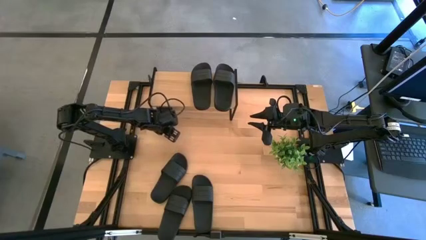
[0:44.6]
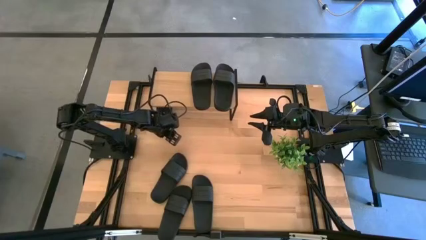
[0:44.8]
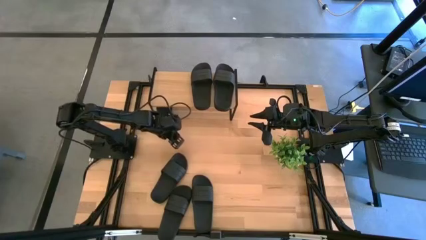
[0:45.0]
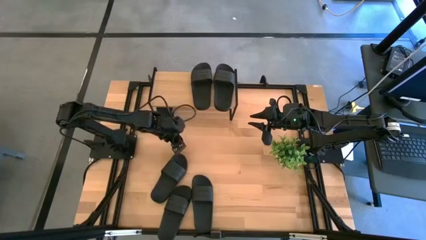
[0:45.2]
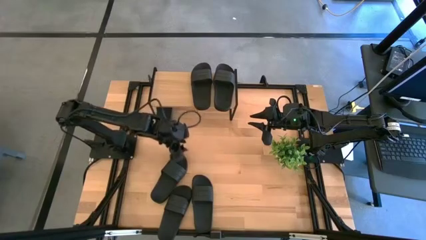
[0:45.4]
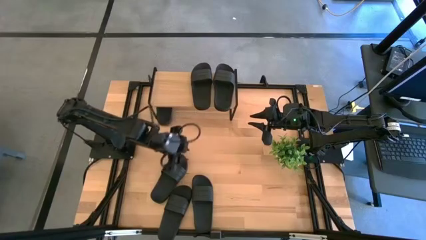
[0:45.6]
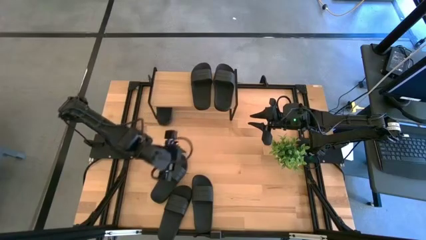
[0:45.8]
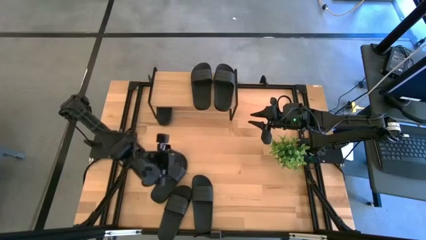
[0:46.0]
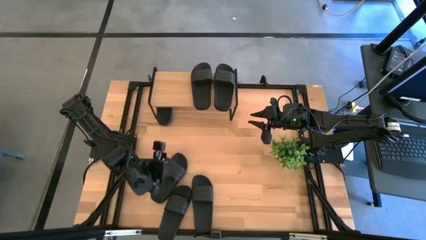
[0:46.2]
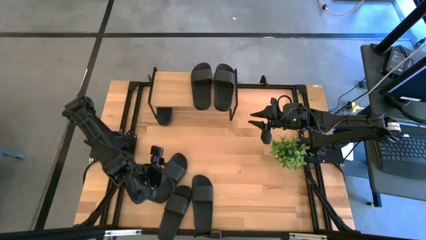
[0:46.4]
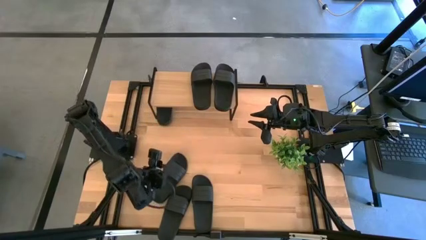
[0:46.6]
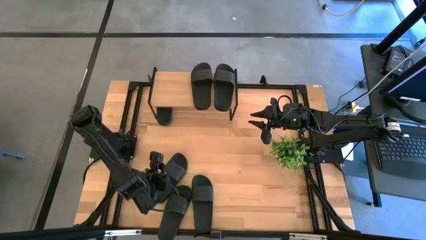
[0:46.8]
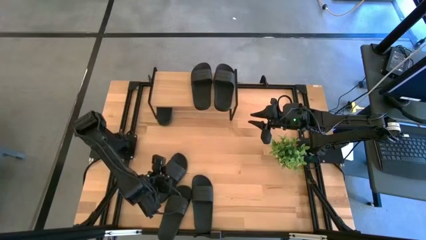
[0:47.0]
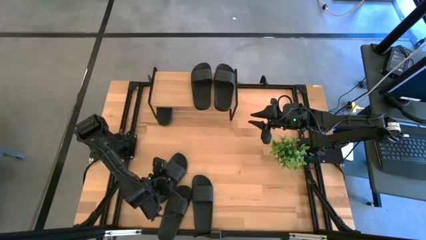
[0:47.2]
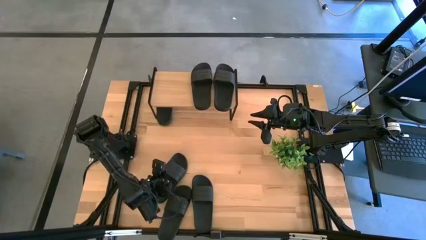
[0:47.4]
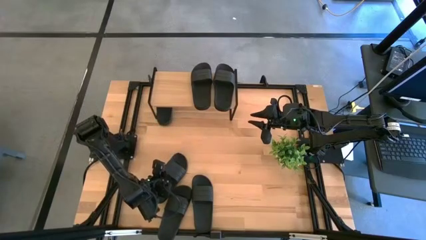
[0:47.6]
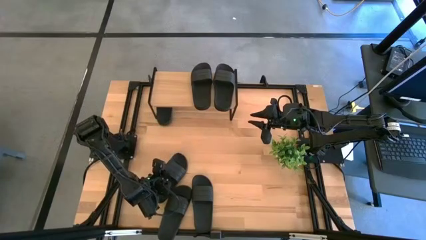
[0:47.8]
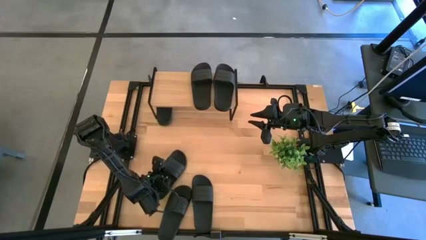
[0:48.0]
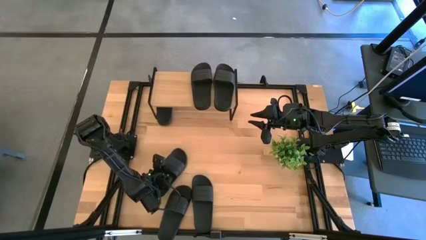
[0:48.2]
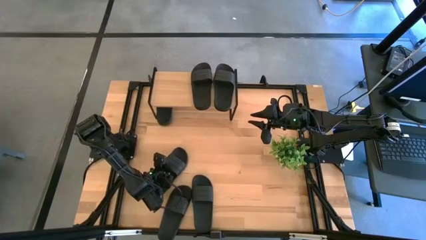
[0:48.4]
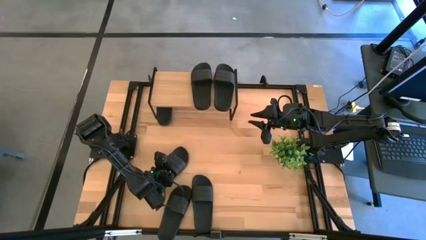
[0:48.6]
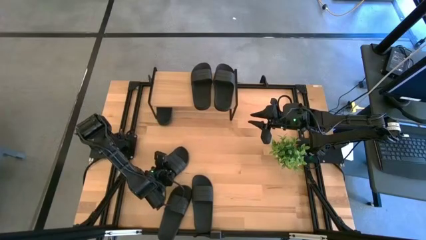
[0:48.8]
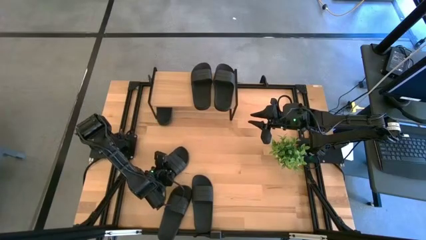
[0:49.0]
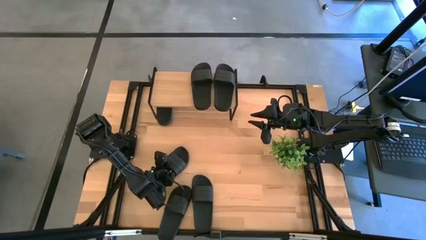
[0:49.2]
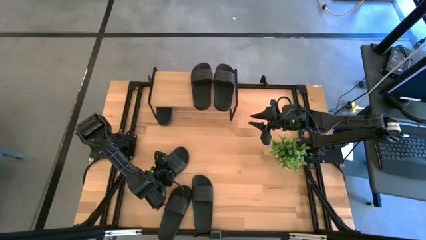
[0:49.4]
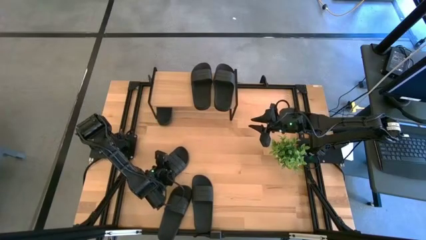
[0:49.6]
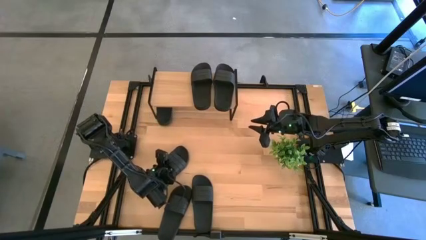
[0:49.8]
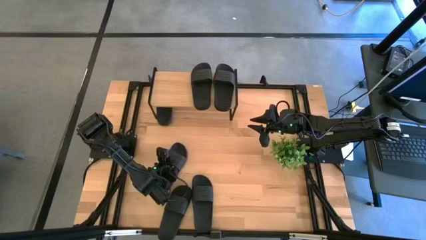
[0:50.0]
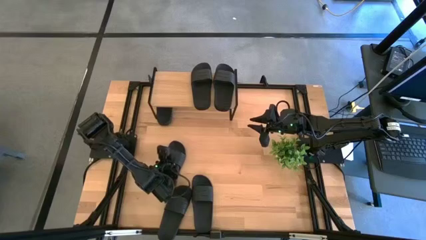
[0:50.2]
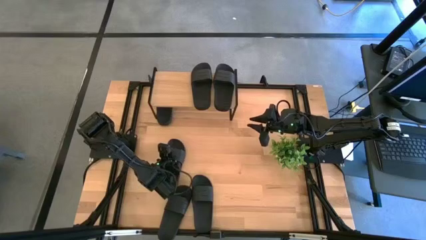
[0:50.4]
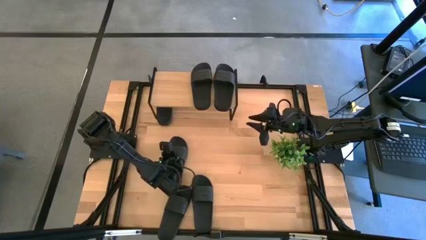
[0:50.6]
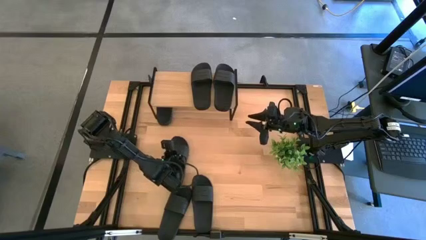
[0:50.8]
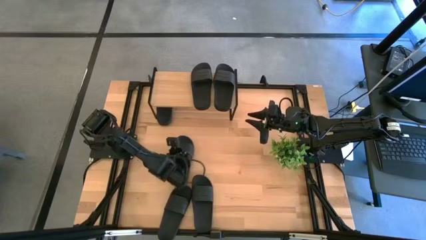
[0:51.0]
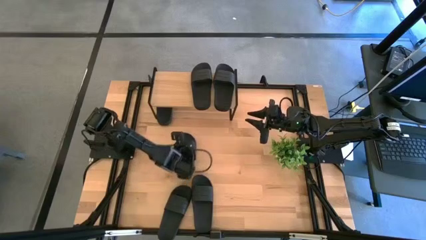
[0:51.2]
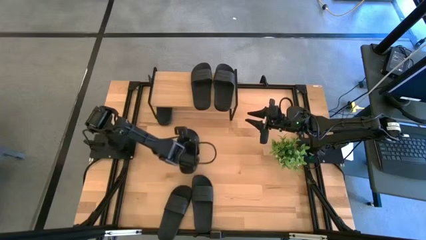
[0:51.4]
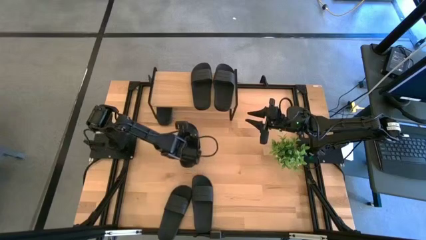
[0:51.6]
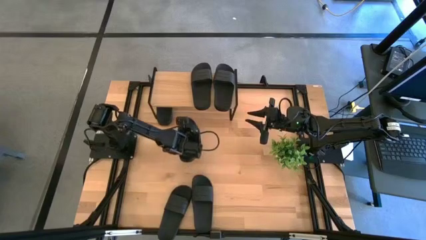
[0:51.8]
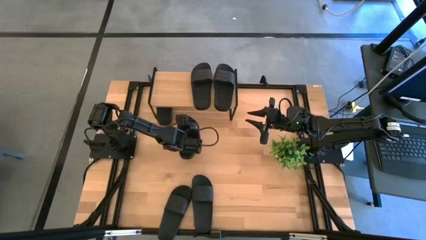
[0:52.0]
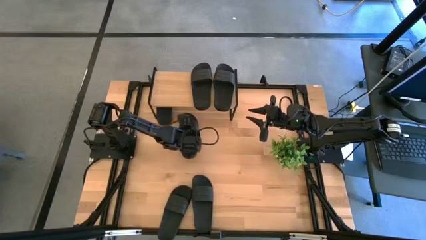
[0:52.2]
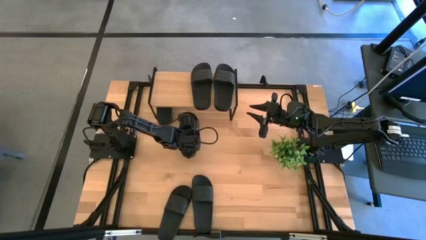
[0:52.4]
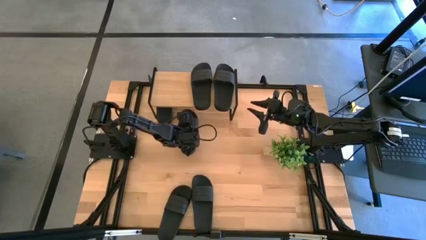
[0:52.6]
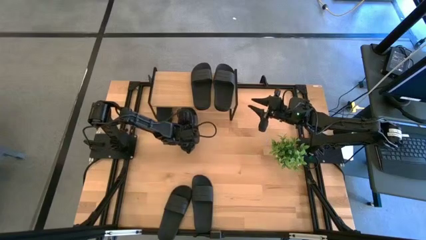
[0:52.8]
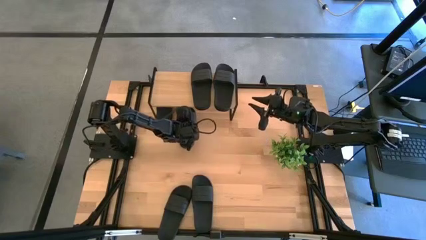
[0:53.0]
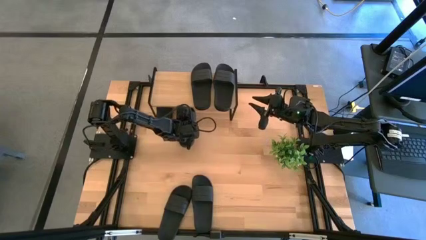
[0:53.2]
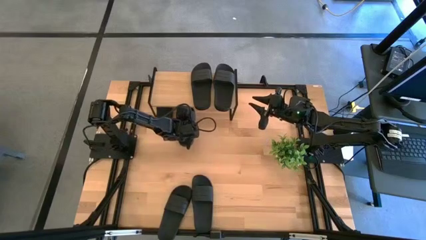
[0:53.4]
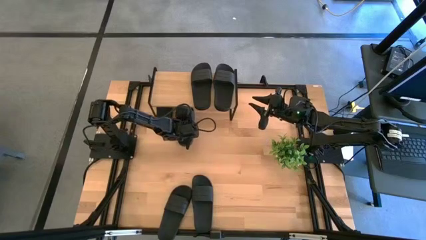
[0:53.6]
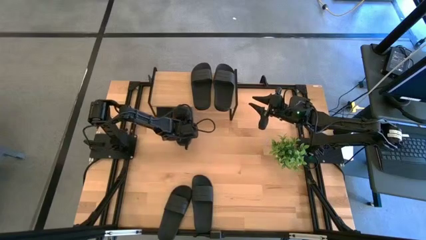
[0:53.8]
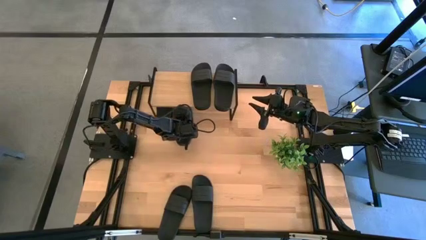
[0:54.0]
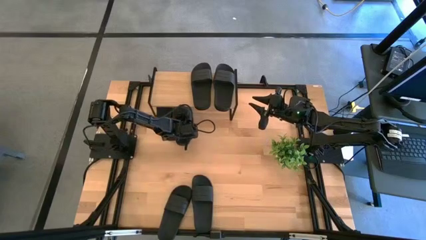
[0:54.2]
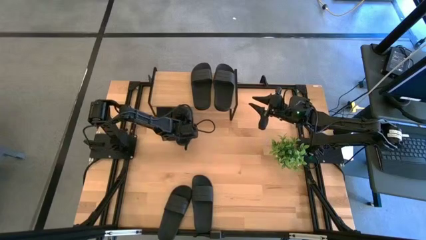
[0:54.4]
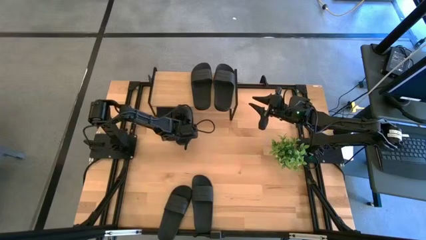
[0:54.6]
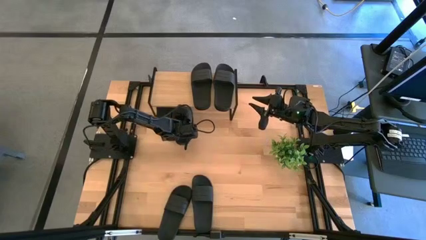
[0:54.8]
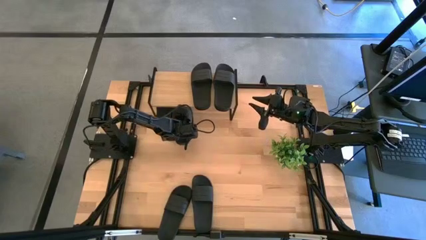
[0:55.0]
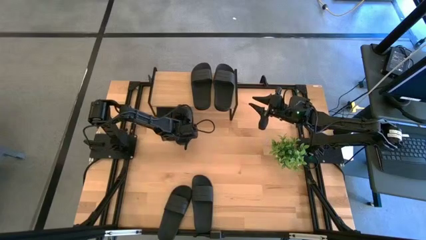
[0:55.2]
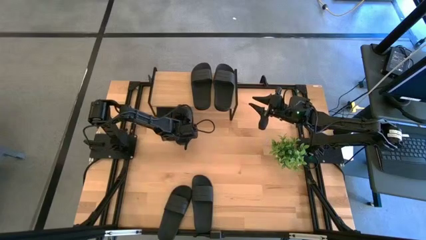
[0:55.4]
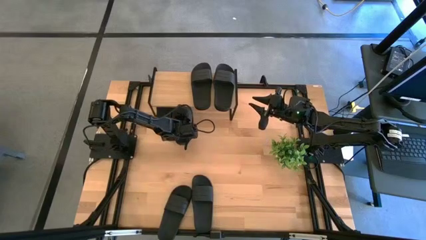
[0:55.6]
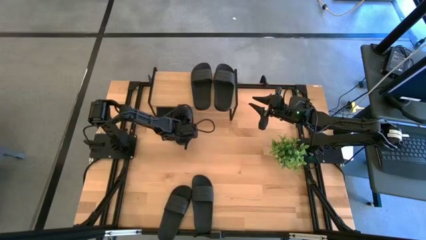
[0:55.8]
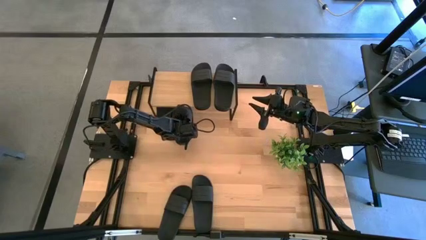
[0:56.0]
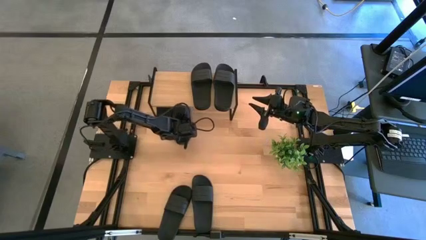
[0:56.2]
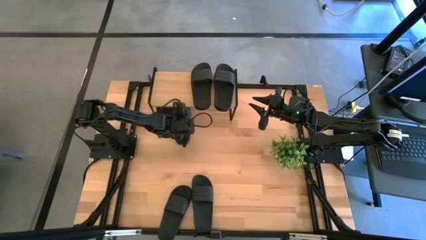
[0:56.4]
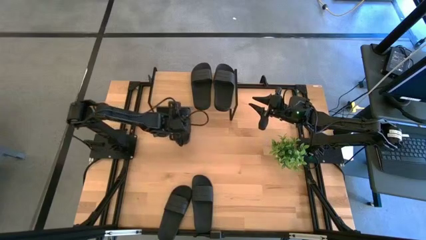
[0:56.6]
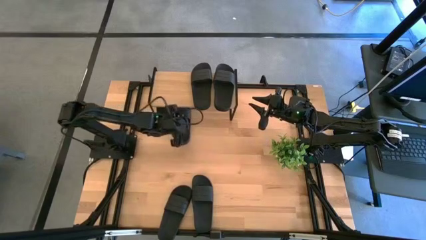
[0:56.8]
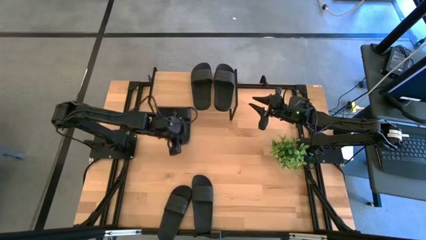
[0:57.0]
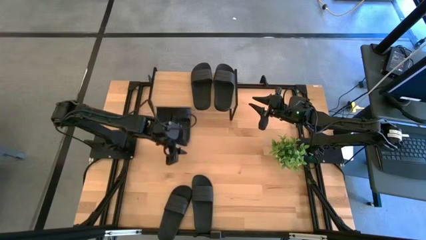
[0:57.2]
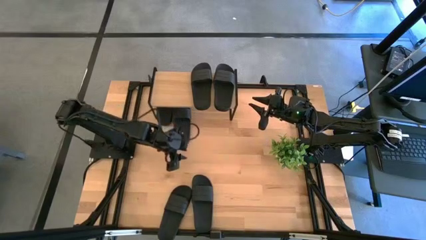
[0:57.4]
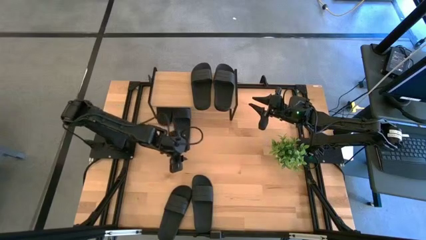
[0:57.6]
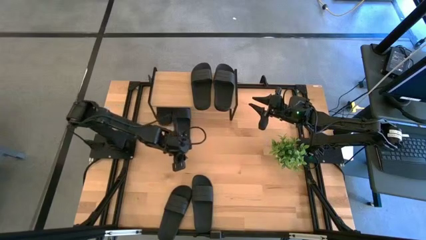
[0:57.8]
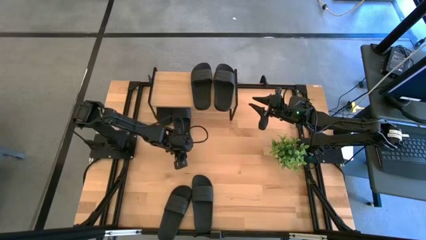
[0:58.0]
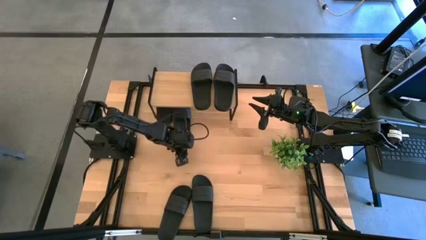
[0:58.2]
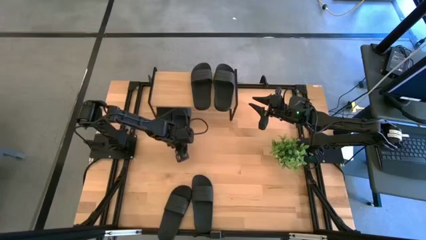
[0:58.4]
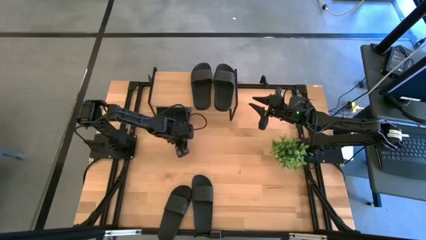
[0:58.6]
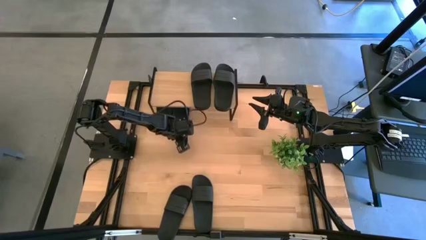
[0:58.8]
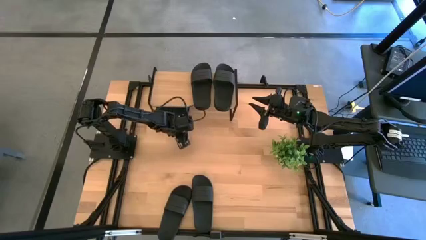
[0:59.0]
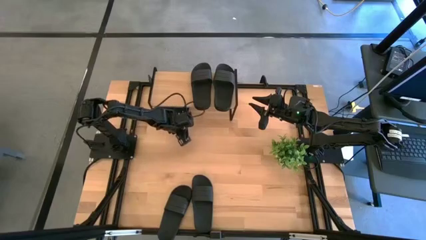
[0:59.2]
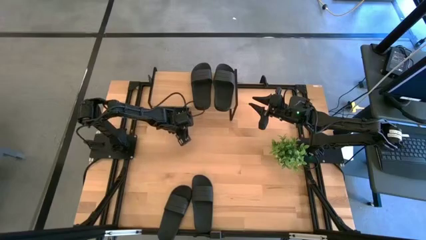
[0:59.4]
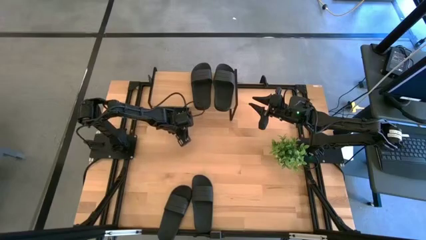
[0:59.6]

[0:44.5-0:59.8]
Task: Pick and place slides into the shelf
Put the black slipper under the shelf

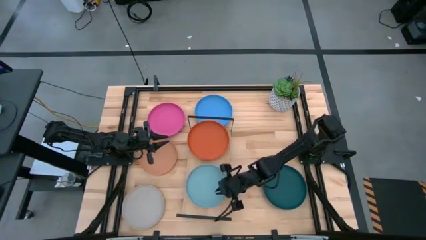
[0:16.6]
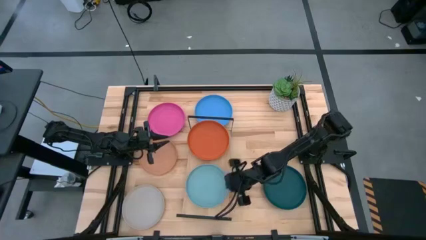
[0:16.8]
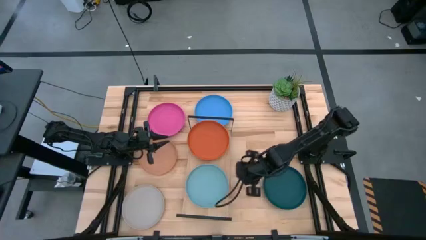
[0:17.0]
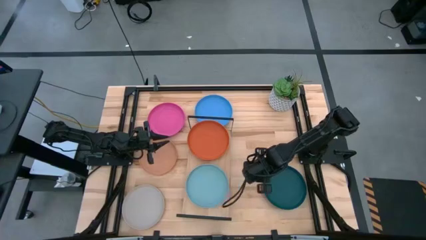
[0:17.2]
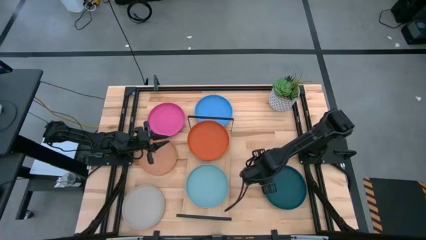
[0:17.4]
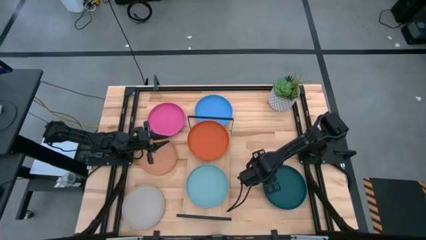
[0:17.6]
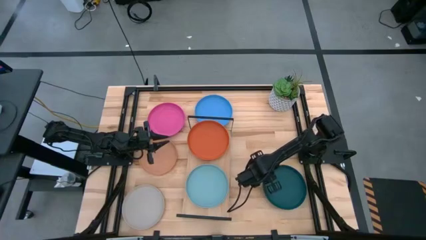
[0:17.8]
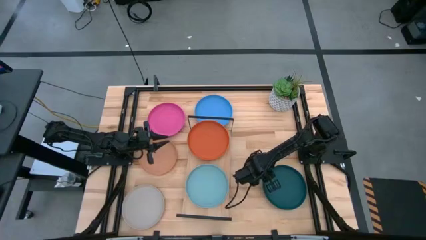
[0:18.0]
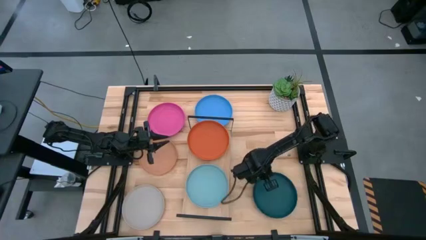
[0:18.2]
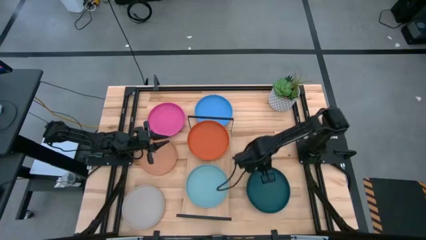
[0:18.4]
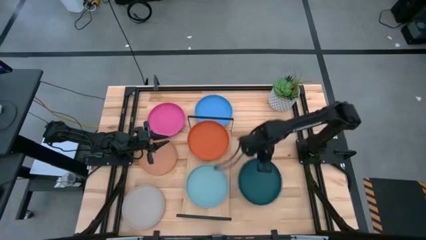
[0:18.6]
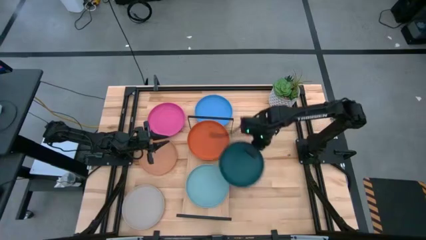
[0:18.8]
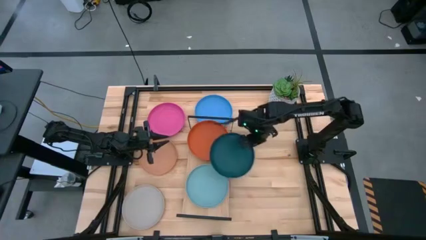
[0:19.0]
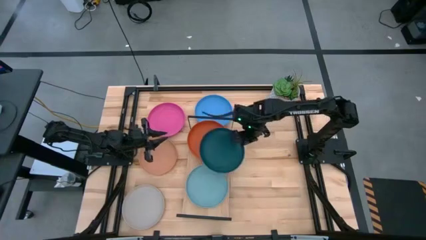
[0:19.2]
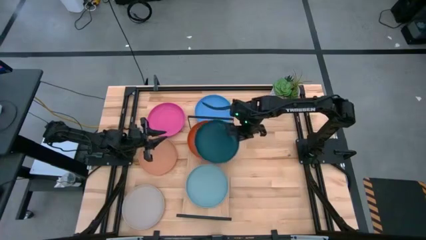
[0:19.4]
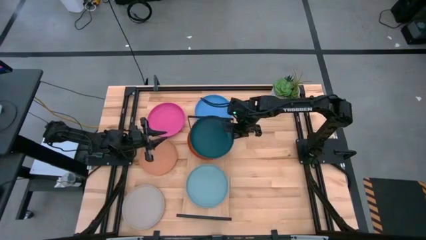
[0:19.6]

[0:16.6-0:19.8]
Task: Place and stack plates onto a shelf
Stack the dark green plate on top of the orange plate on the shelf
